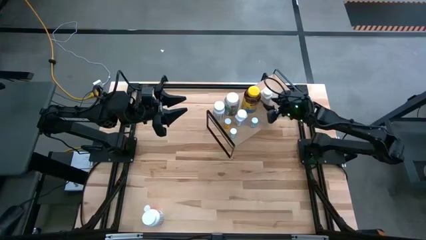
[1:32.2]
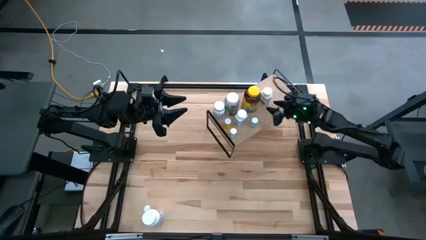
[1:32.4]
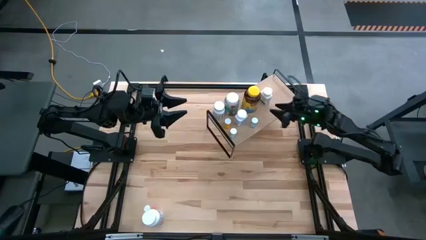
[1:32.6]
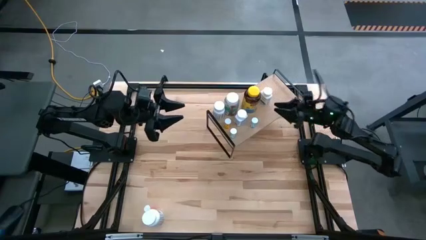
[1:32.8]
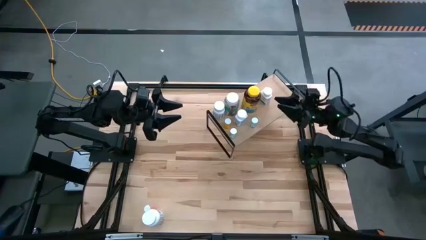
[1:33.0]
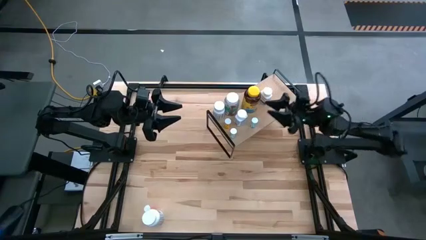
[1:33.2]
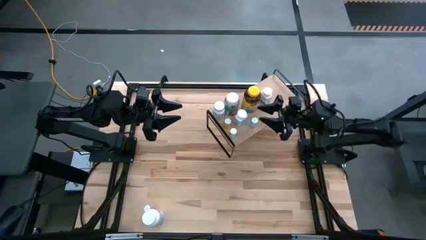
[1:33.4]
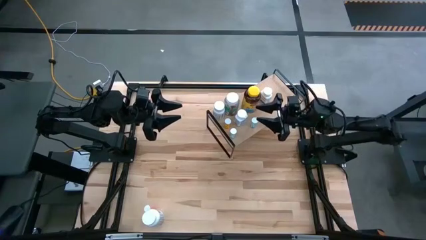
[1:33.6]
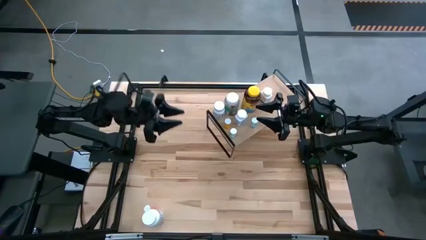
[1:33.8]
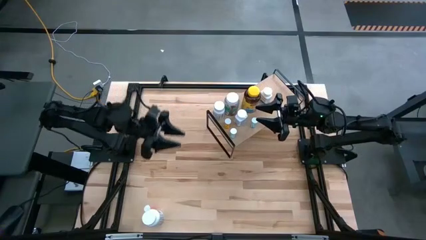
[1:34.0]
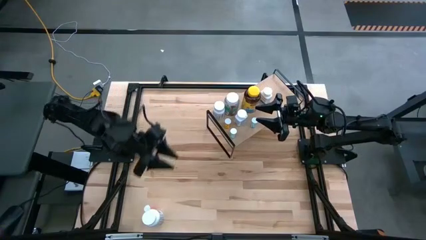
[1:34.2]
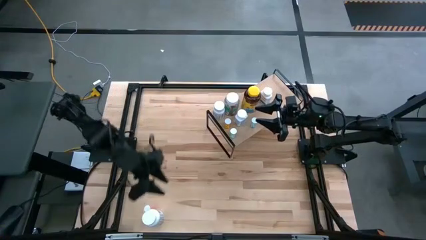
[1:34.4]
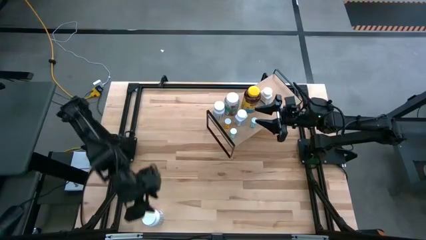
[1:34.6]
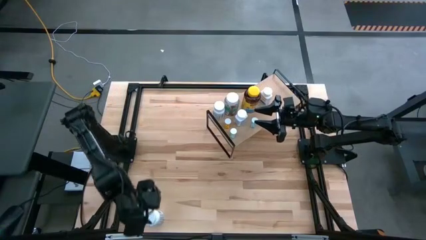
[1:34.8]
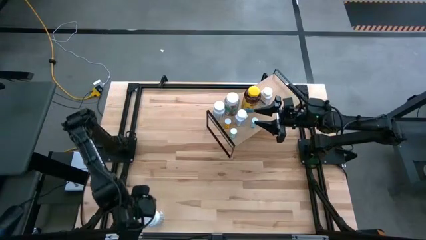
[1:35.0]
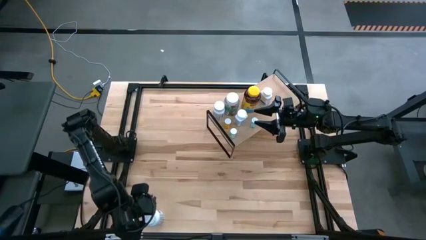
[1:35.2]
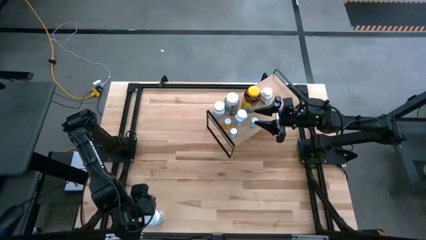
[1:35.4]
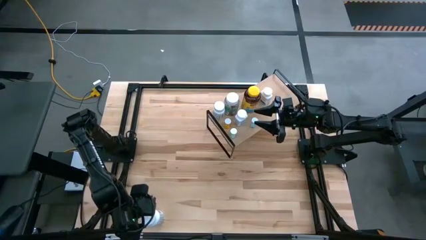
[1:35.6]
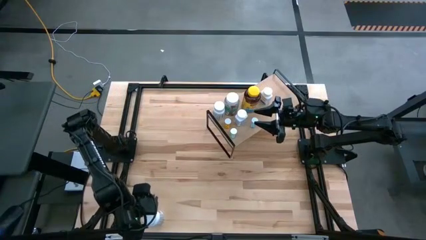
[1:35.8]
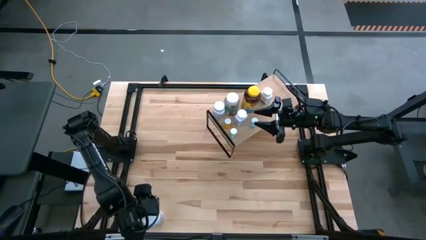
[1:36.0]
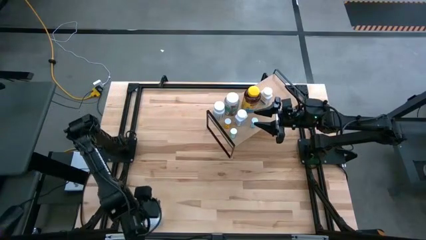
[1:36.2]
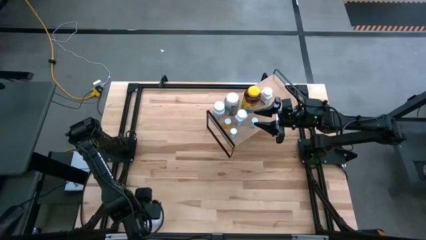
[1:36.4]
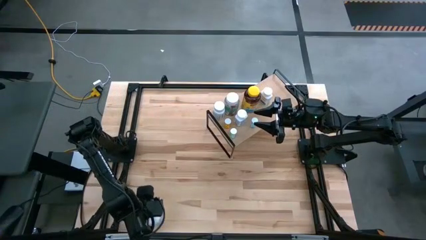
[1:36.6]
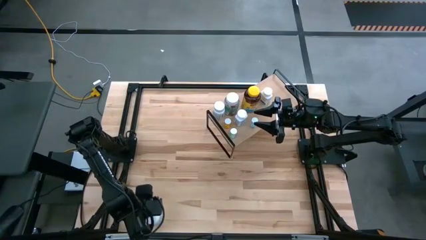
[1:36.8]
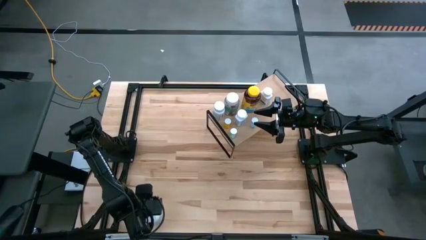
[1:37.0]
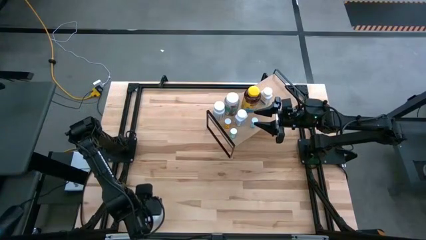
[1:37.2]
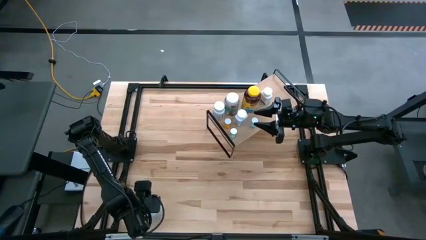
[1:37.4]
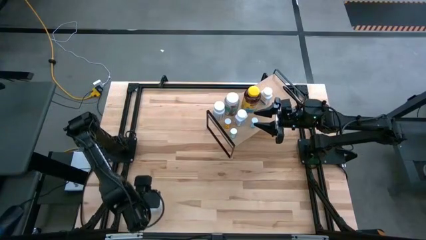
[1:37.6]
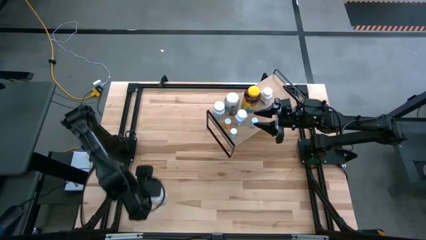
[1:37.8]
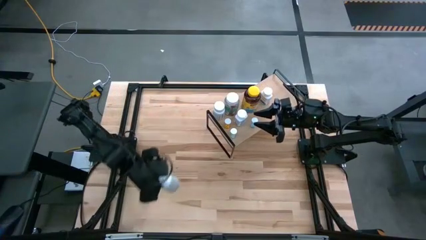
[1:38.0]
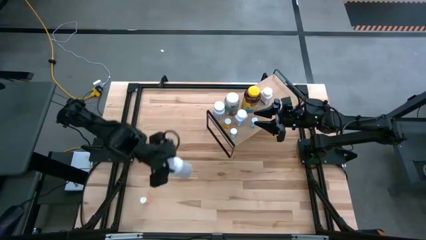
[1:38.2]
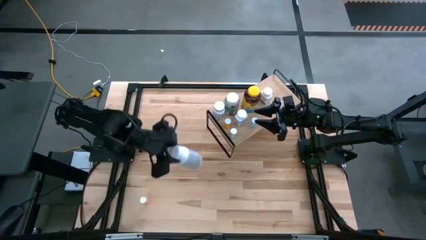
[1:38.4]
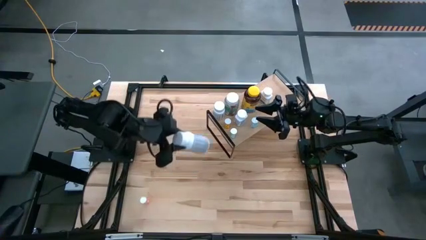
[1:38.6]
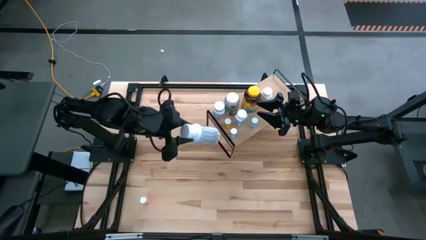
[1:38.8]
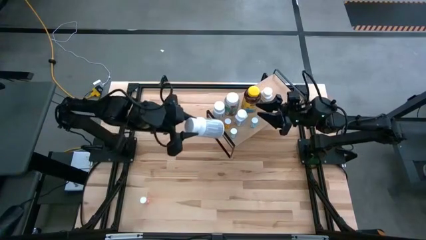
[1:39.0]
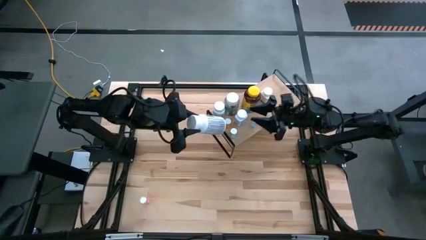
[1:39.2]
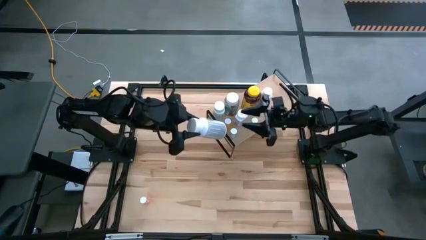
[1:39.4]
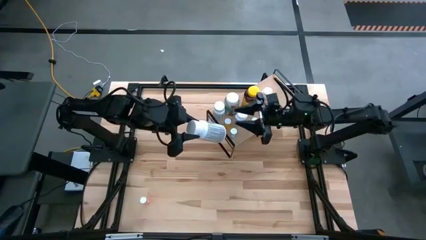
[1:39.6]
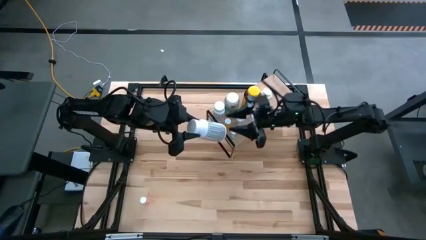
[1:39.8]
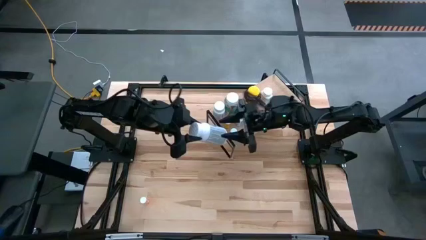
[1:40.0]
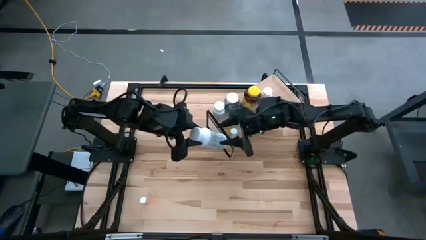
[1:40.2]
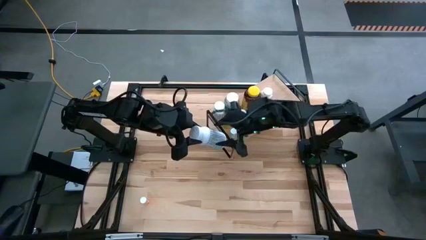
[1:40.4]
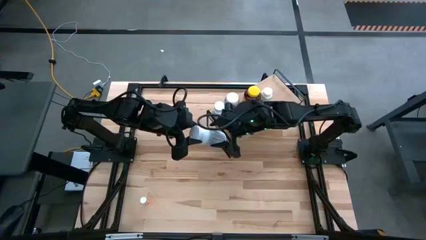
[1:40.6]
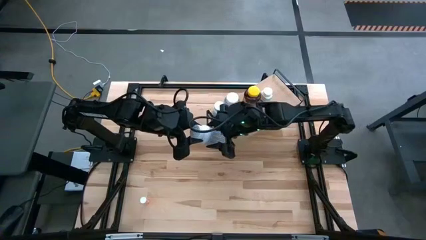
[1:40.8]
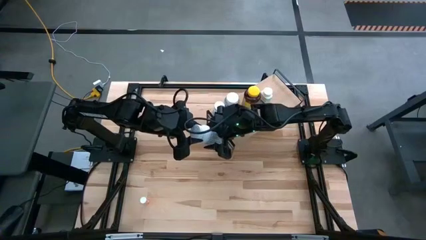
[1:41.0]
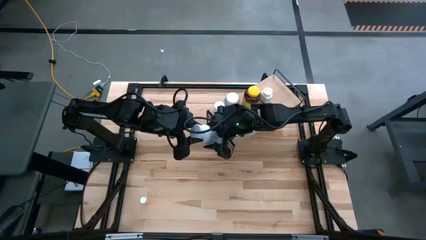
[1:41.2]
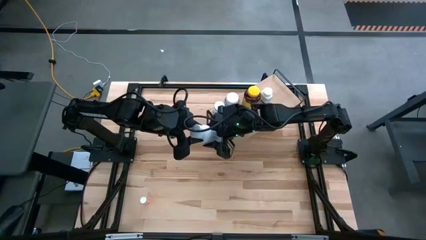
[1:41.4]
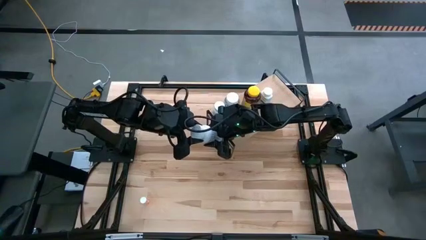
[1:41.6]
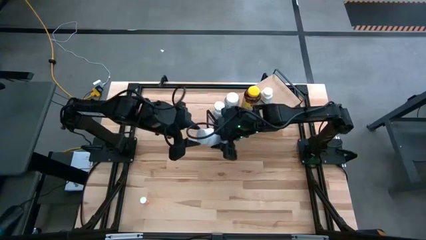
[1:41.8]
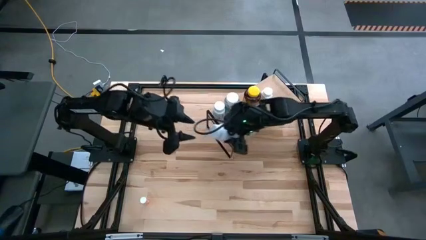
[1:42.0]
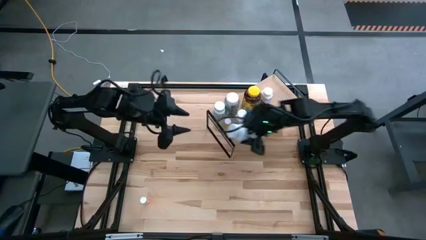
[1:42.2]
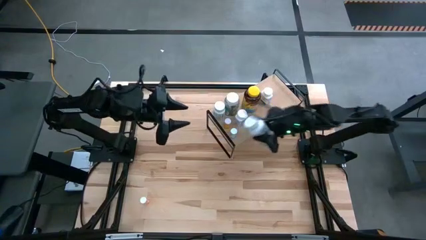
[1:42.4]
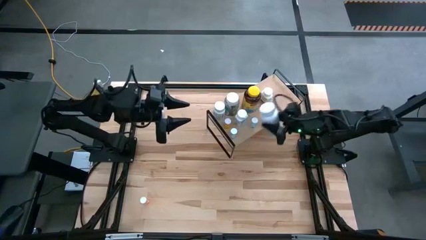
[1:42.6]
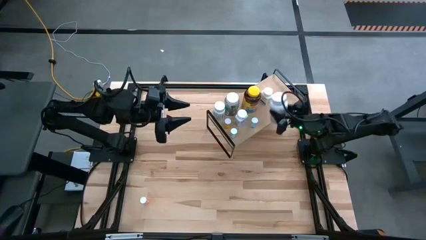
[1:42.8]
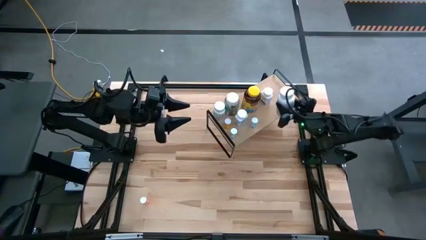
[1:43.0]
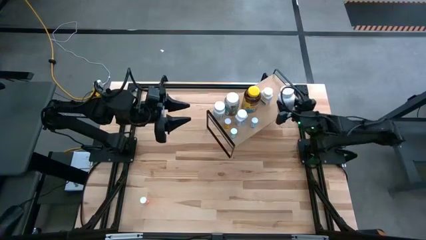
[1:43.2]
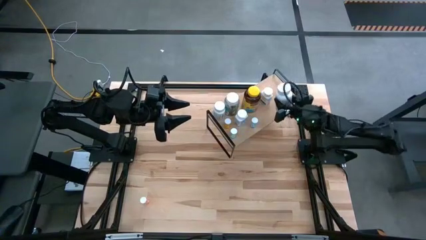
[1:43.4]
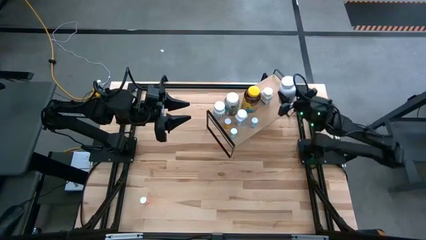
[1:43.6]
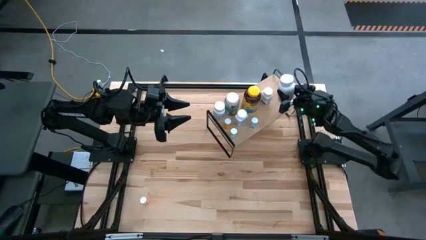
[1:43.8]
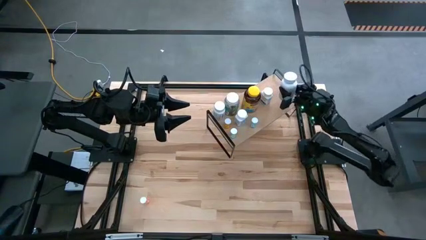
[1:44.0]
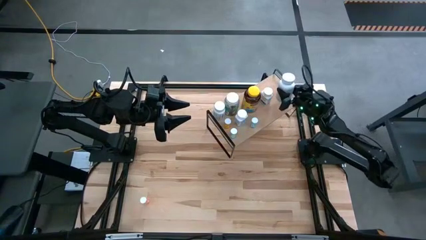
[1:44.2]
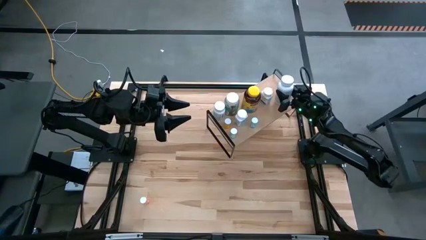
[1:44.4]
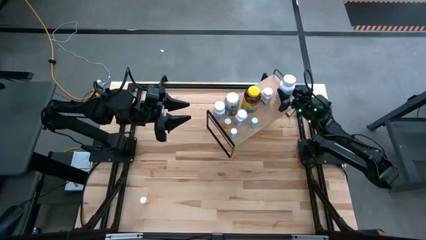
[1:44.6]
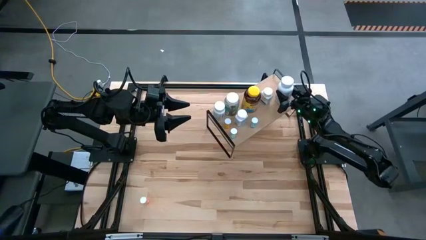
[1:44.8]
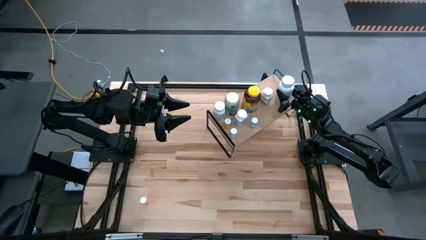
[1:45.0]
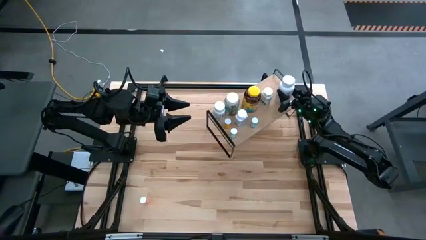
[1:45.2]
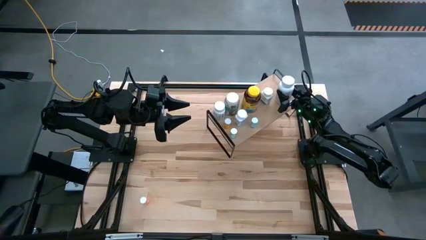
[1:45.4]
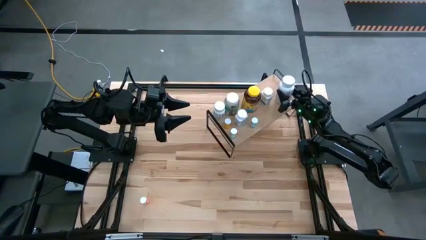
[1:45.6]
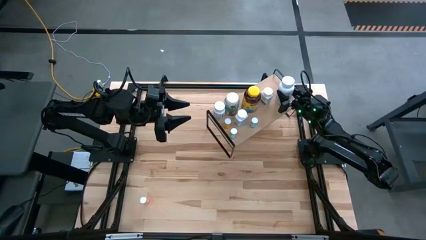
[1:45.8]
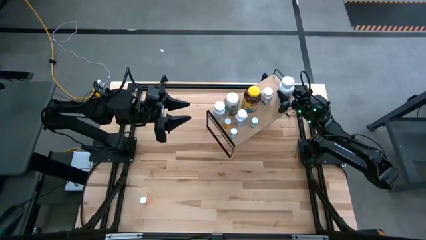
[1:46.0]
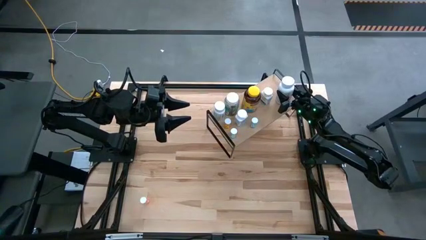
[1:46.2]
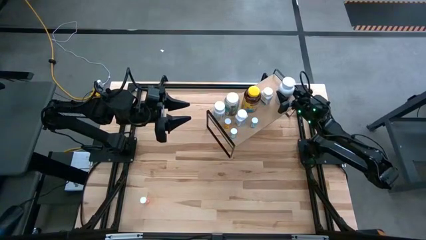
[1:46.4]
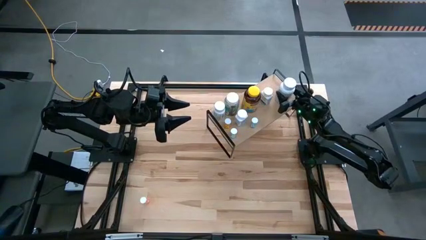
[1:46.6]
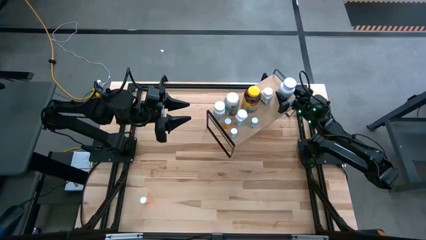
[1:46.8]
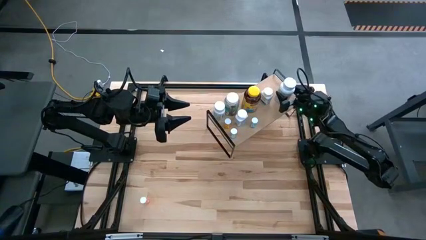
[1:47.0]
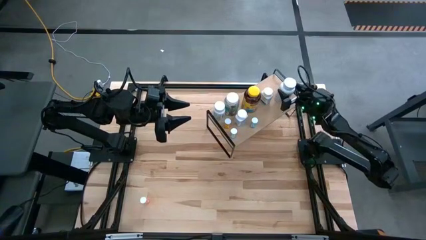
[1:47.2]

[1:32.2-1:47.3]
Task: Pick and place medicine bottles onto shelf by color
Put the large white pill bottle on the shelf

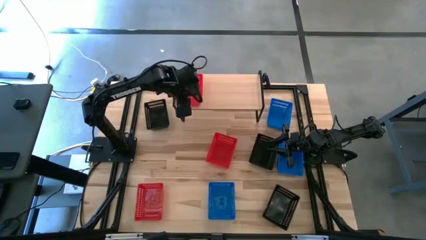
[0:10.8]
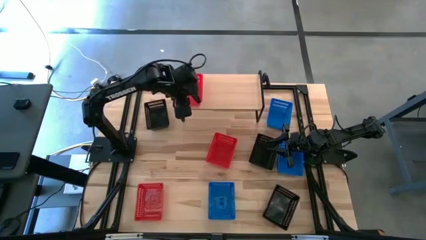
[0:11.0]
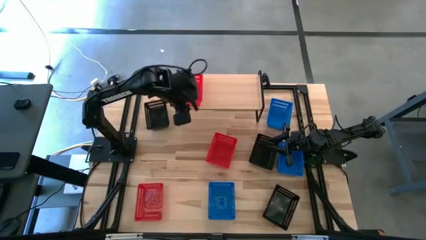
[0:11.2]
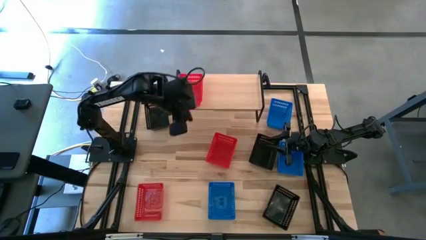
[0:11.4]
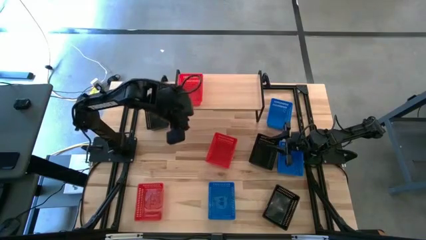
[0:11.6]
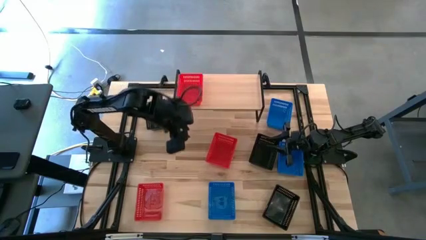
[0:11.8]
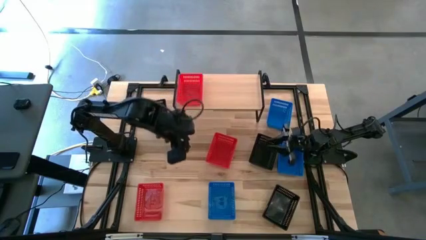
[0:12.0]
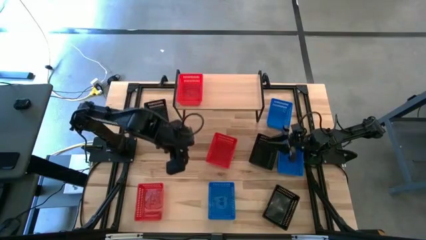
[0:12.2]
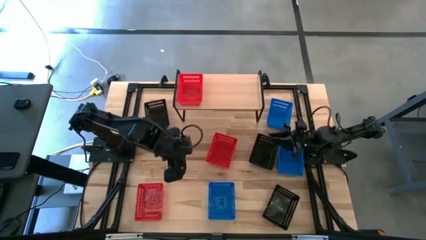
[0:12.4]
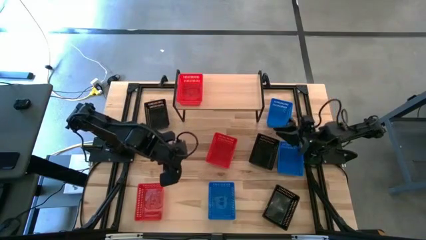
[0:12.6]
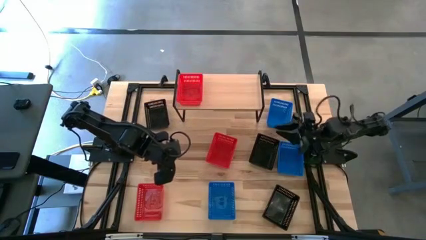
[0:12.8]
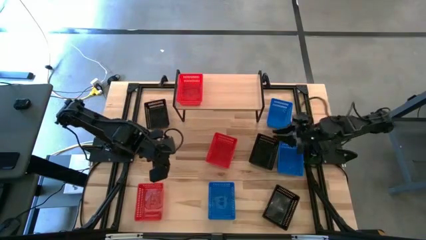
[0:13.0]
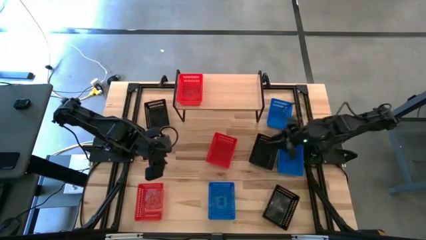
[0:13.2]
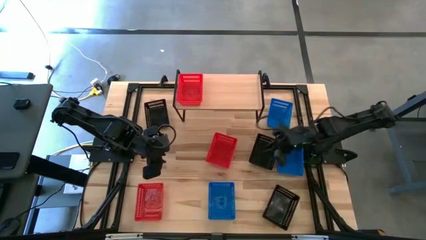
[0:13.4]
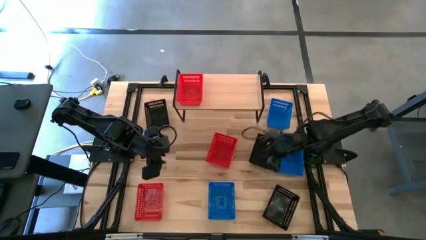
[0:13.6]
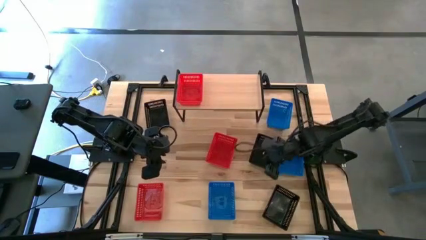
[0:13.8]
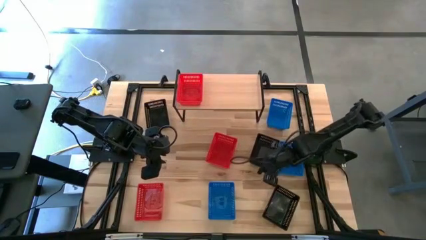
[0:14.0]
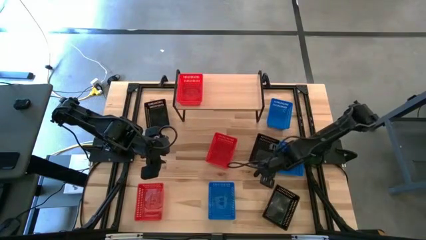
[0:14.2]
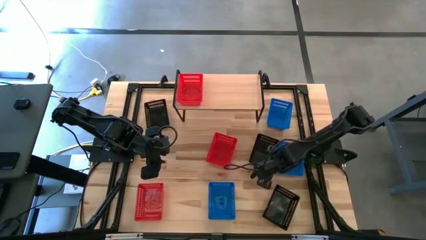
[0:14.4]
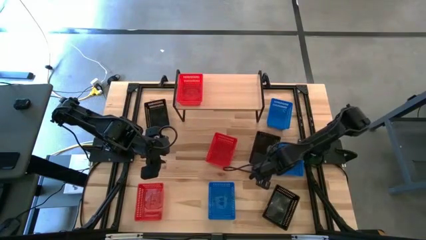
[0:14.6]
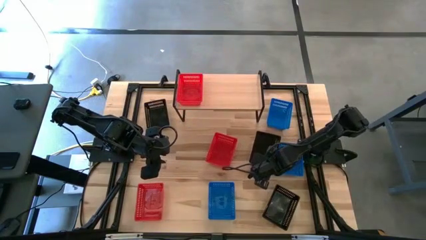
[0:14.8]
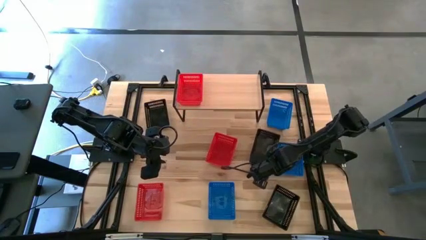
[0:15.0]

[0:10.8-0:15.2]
Task: Stack baskets on shelf by color
Put the top right black basket on the shelf
